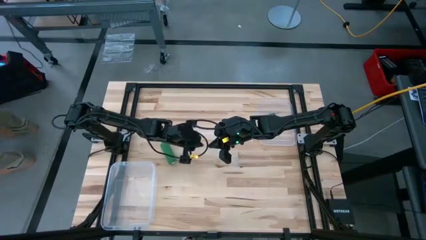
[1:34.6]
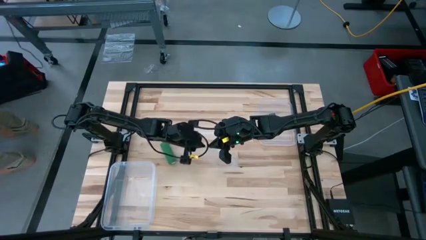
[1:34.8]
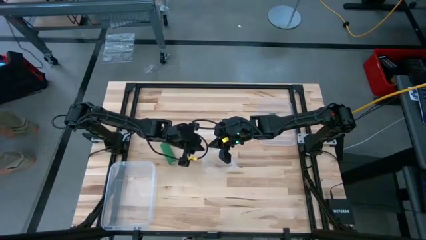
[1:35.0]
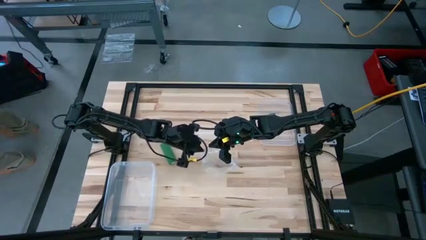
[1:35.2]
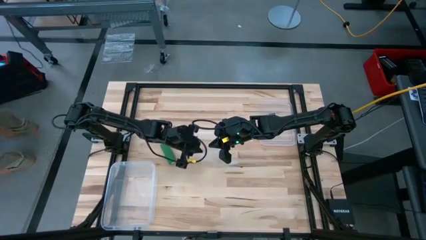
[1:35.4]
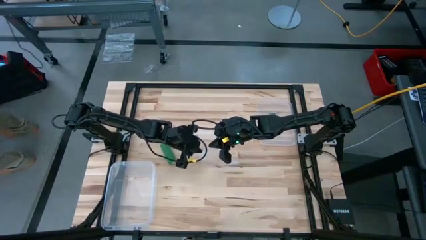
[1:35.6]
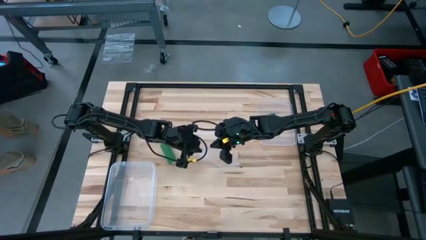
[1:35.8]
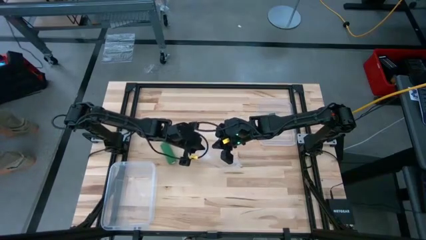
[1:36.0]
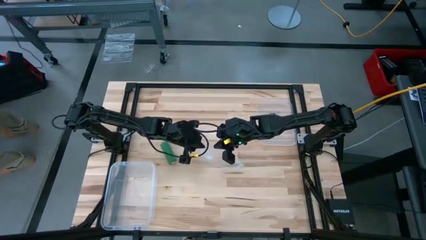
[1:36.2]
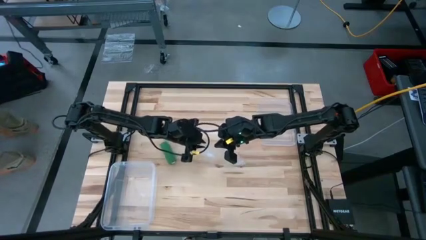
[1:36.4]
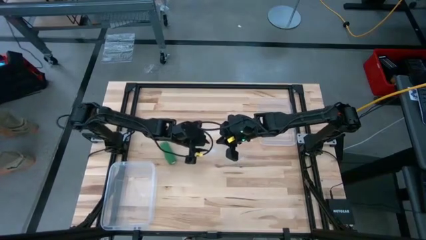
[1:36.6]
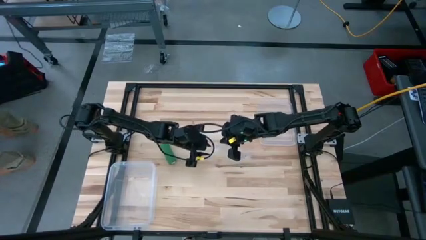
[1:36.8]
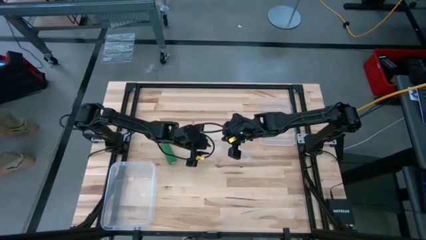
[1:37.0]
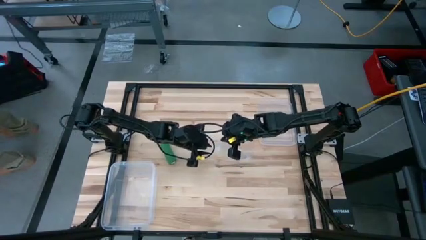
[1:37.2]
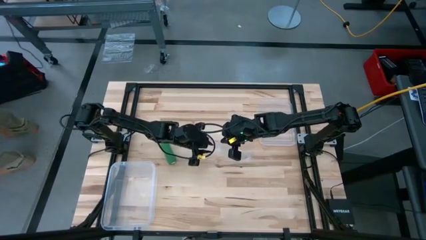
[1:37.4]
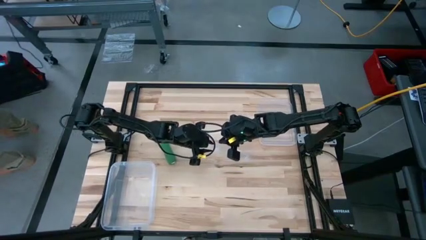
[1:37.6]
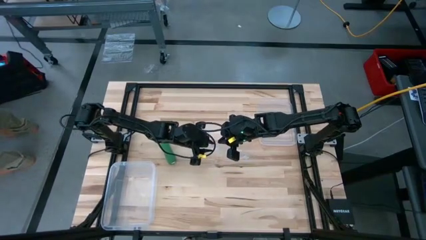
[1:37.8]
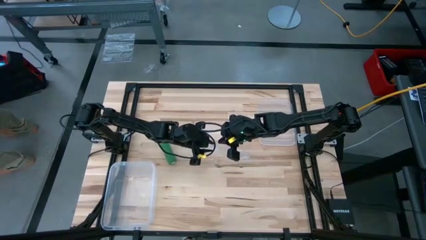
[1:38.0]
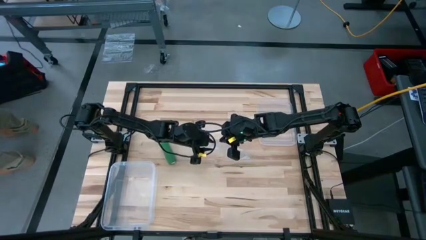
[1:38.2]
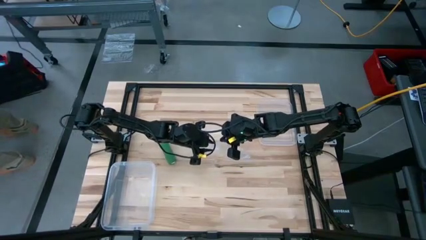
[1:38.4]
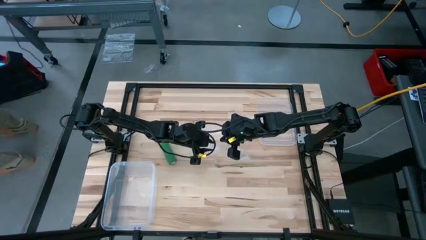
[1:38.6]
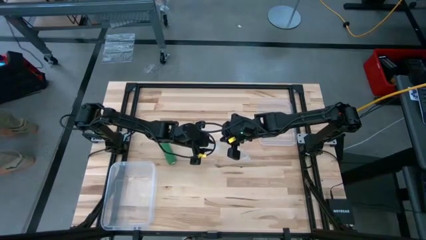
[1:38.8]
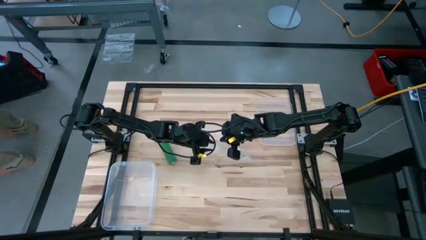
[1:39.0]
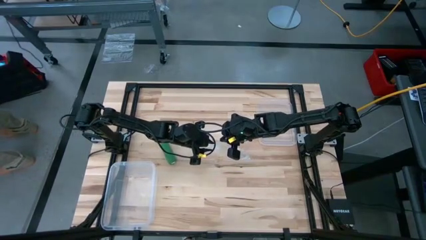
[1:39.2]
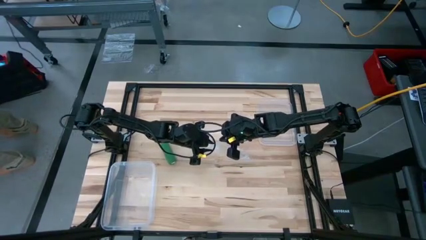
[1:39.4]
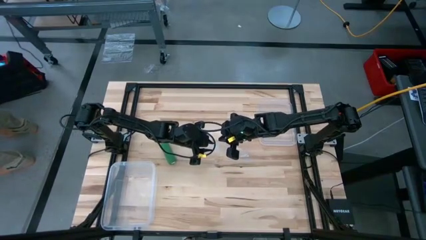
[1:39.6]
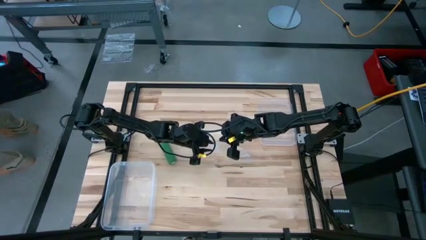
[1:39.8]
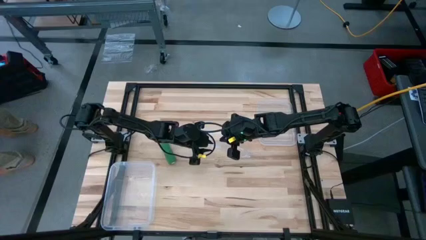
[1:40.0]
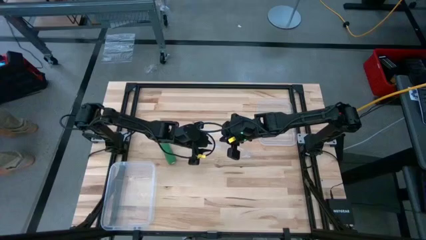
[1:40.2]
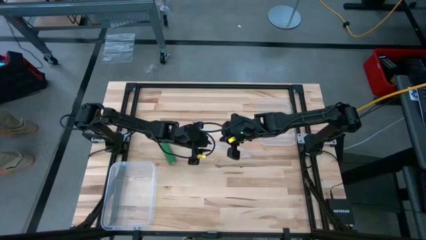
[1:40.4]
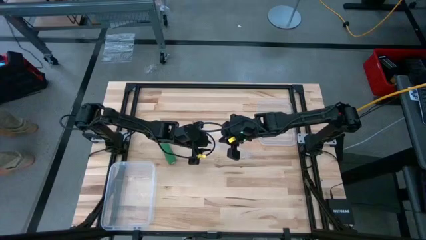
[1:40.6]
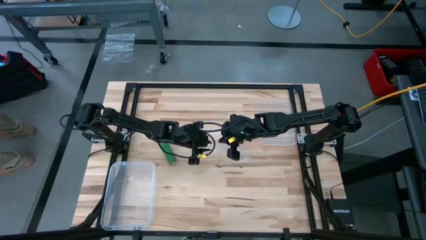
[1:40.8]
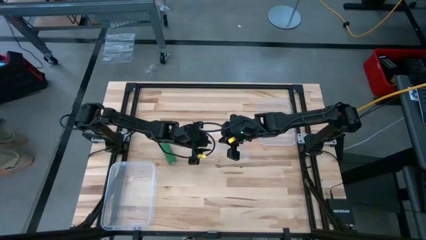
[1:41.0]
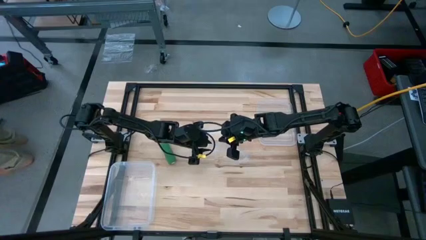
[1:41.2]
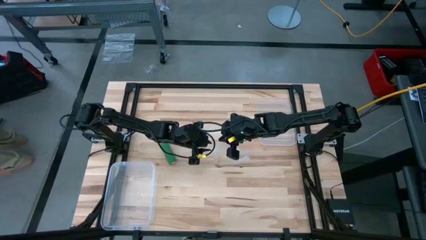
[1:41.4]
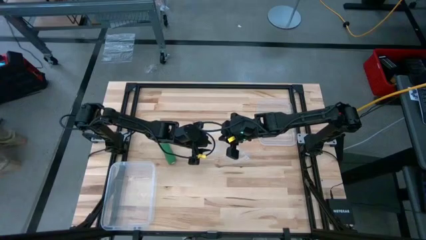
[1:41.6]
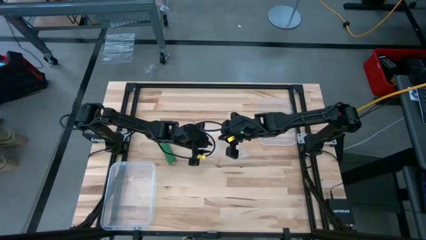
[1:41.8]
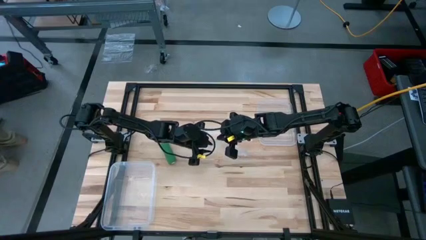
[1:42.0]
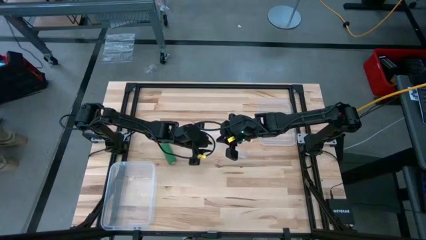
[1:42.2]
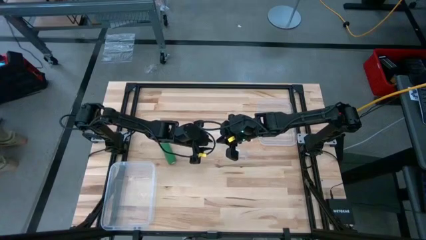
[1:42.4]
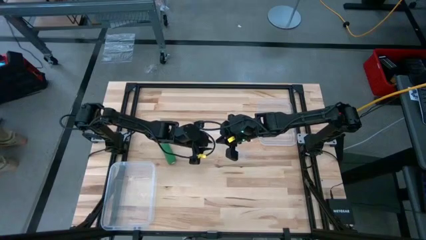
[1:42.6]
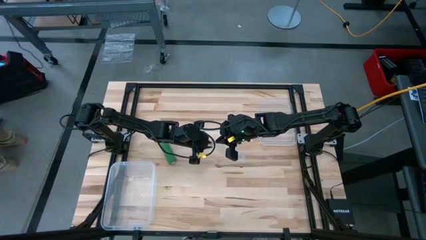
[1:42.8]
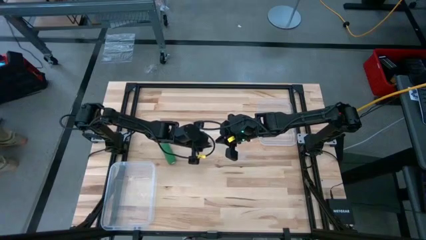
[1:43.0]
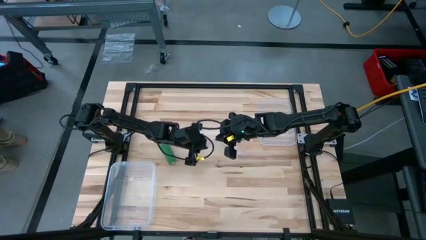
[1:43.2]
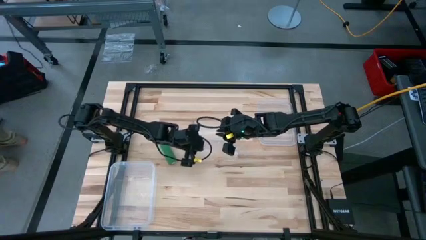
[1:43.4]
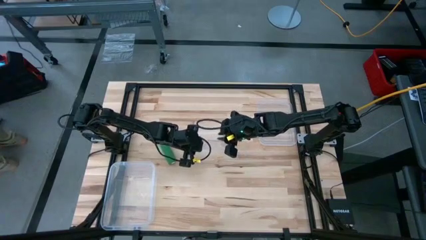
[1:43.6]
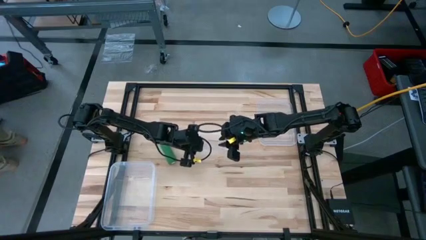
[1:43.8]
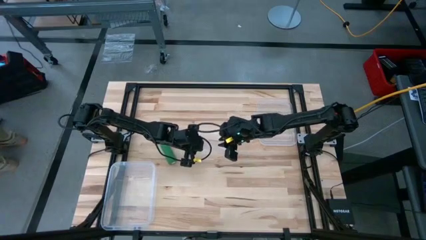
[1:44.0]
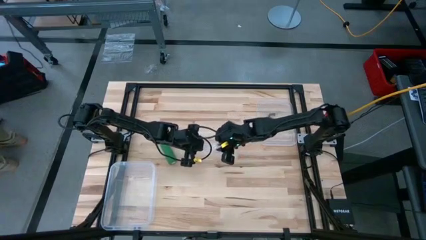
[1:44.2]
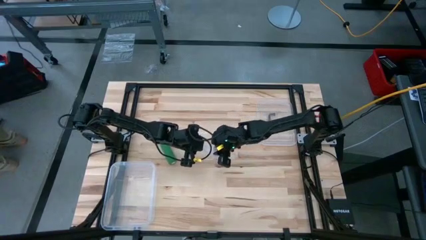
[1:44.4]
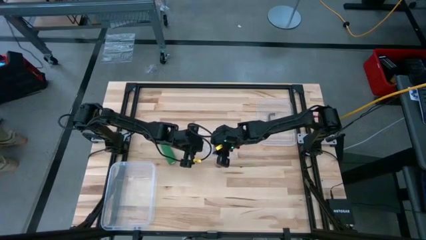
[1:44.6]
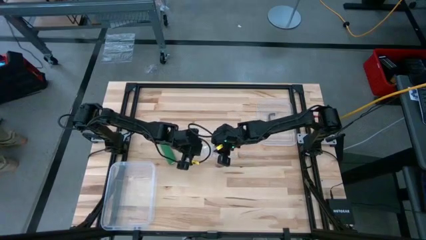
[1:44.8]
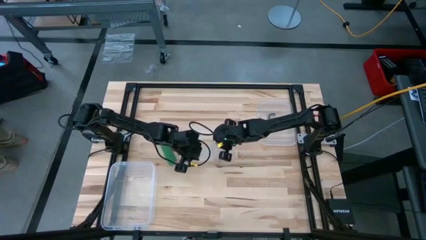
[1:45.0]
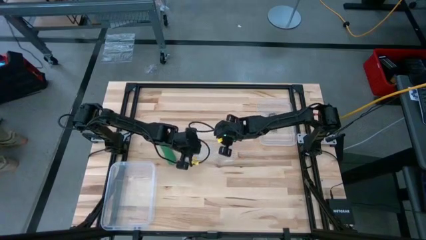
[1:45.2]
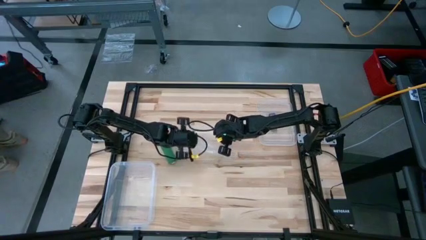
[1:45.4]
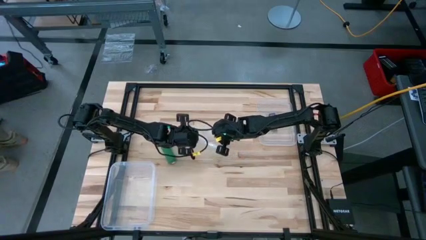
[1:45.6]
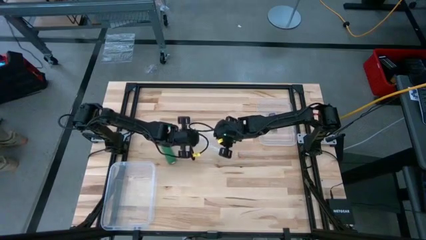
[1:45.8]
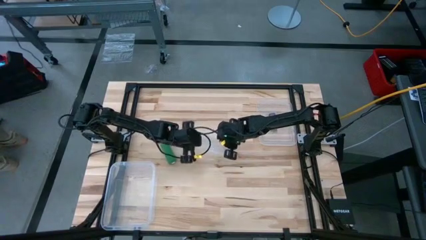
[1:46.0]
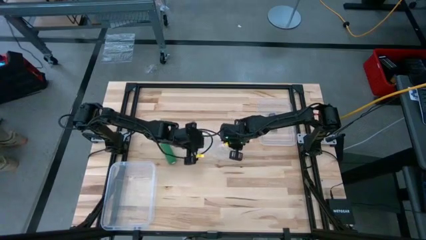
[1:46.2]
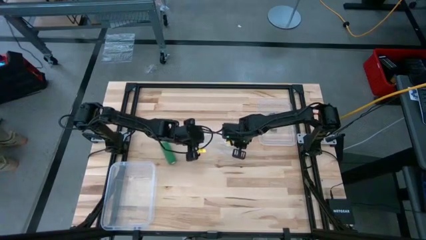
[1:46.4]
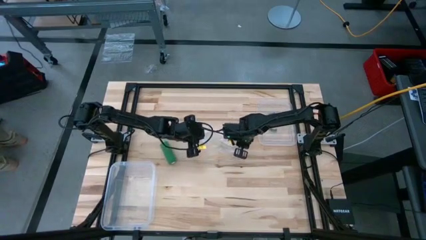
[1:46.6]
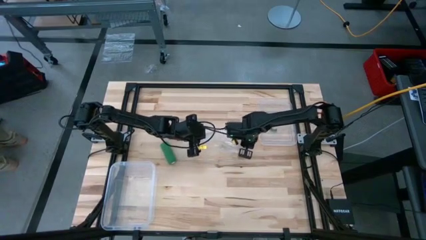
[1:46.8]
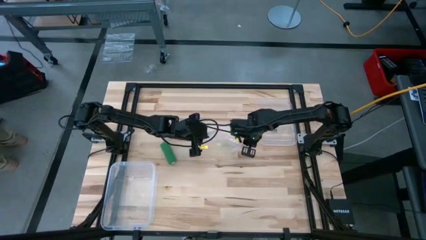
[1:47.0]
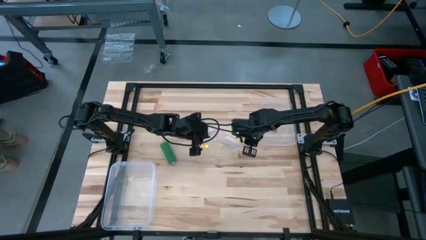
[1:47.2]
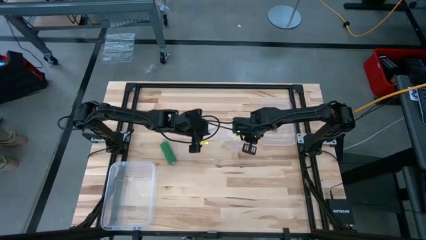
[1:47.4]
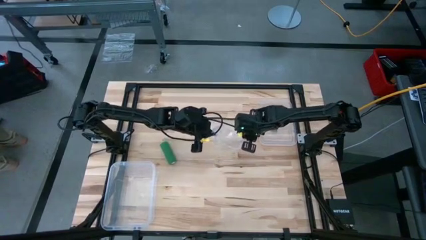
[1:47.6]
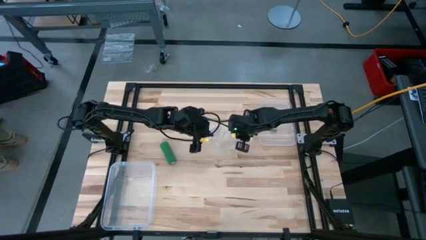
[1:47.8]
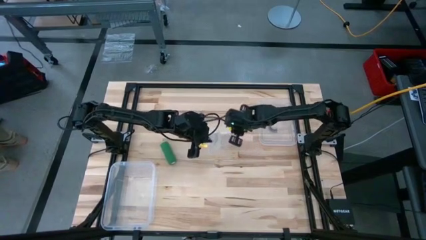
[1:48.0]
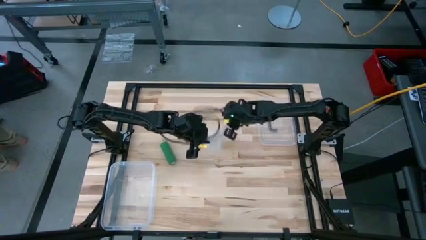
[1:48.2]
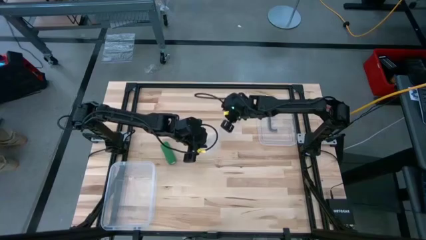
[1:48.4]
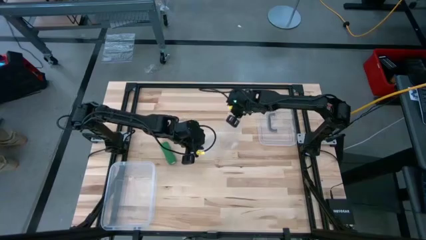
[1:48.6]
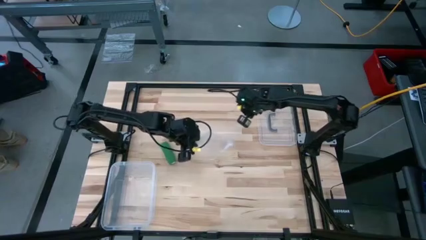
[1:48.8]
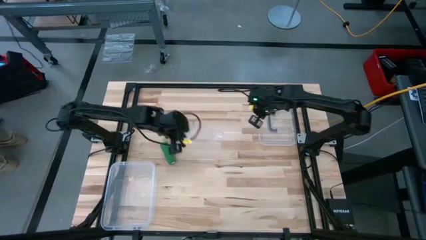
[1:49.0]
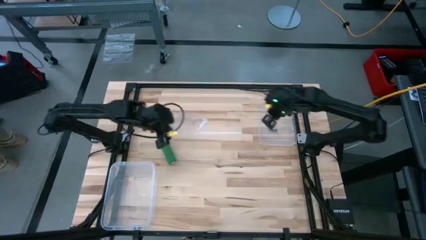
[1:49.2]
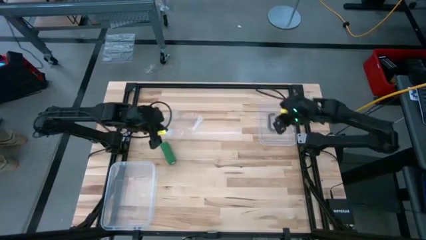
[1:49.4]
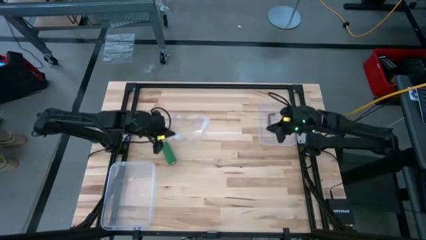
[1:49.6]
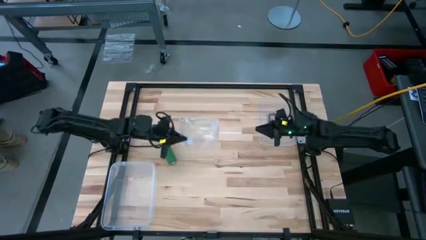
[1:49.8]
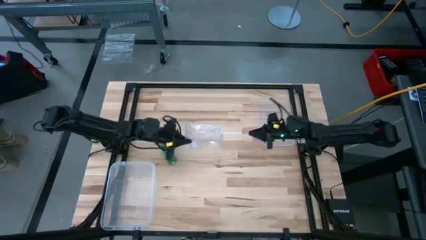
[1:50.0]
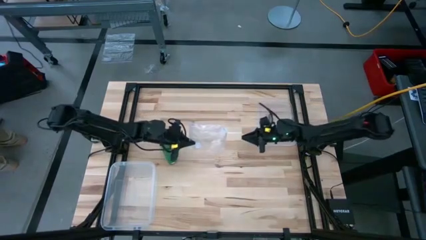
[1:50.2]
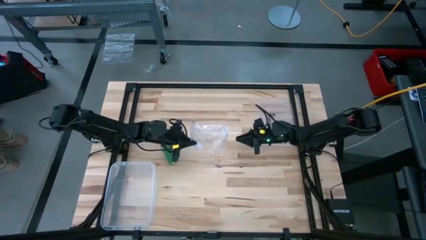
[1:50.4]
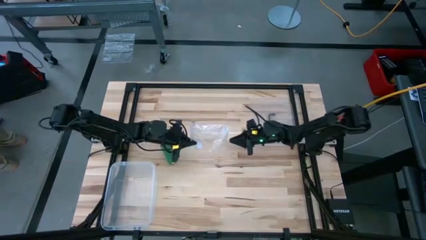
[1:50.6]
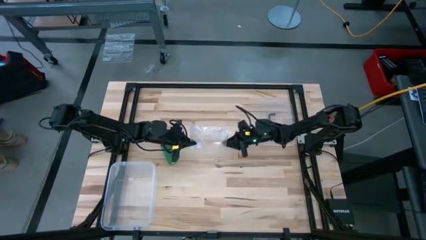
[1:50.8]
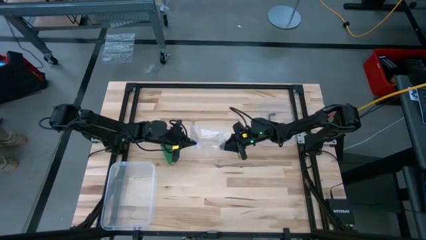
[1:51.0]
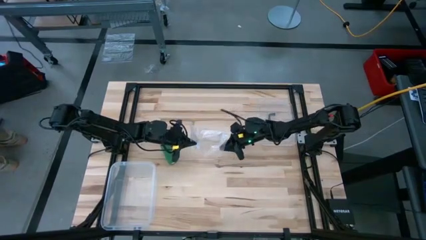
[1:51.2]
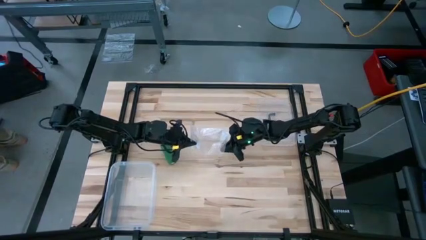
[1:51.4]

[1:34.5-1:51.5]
Task: Roll bandage
Open the zip bag

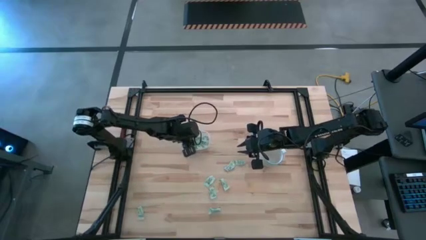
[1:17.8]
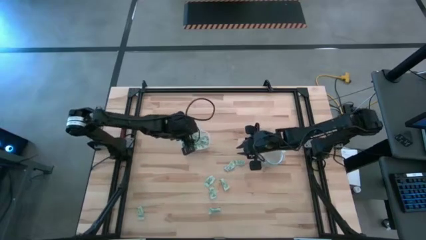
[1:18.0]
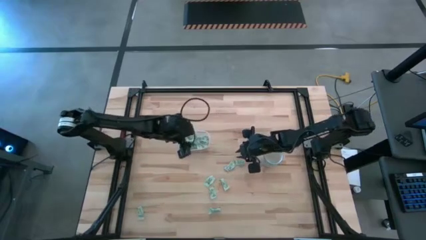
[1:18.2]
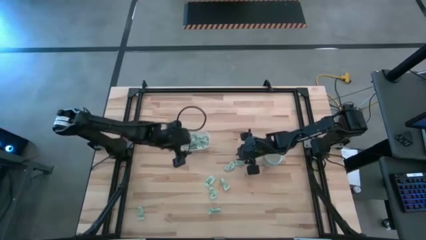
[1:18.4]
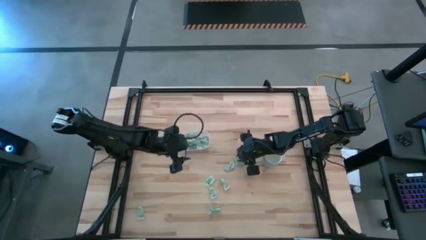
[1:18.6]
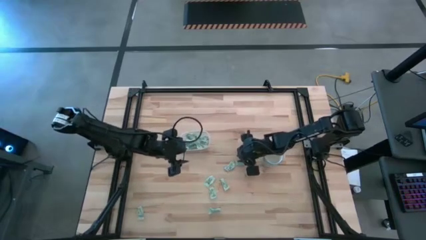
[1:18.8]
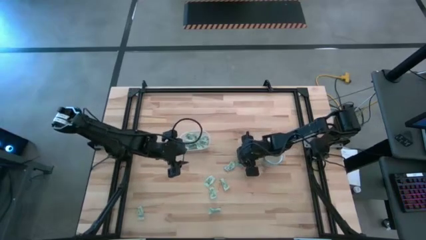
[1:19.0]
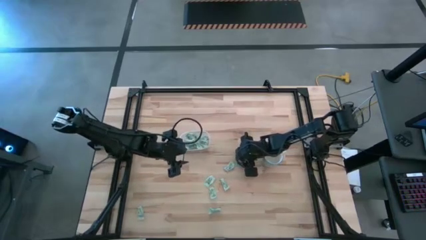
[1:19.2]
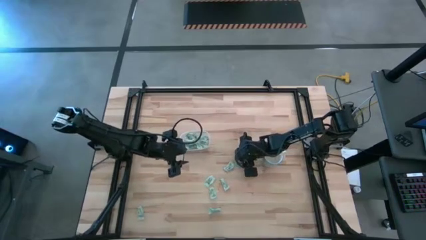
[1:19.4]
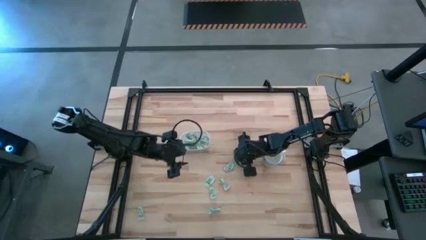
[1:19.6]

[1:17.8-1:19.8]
Task: Pick and place Stevia / Truvia into bins
Put the stevia packet into the transparent bin
